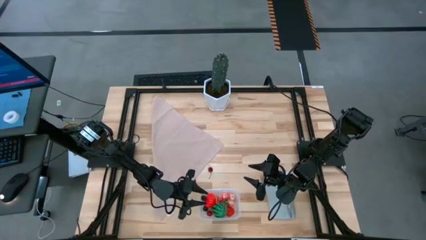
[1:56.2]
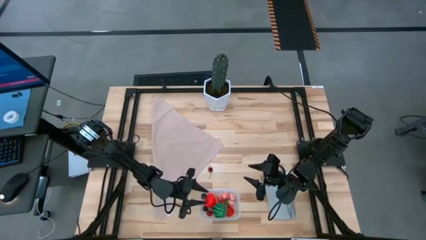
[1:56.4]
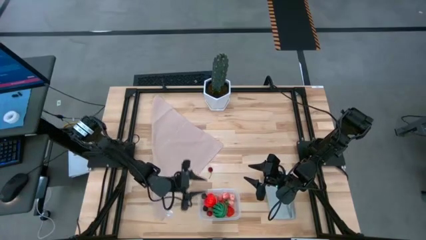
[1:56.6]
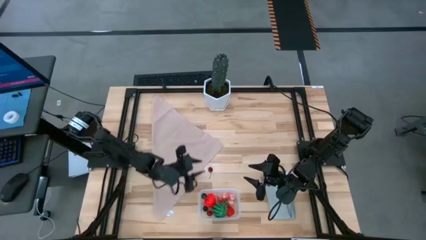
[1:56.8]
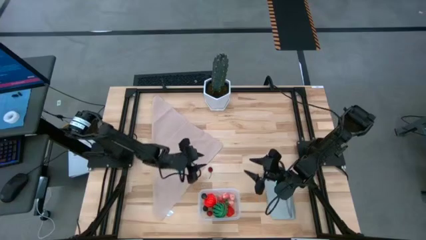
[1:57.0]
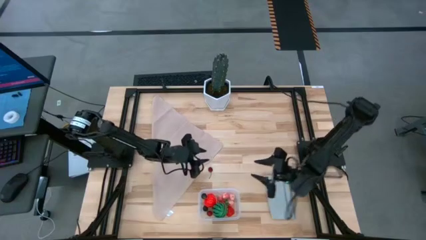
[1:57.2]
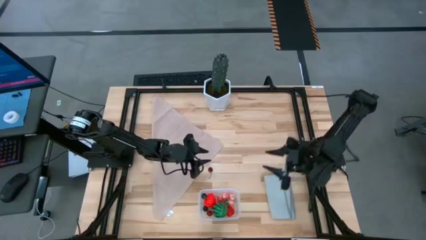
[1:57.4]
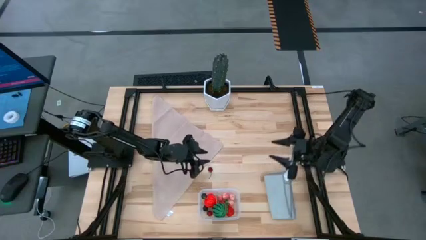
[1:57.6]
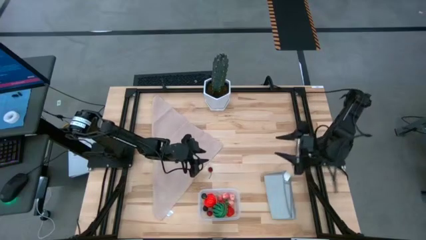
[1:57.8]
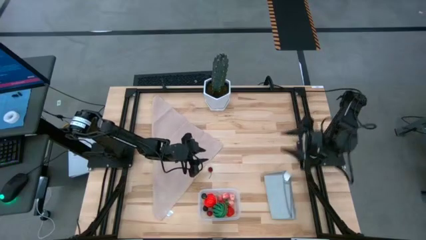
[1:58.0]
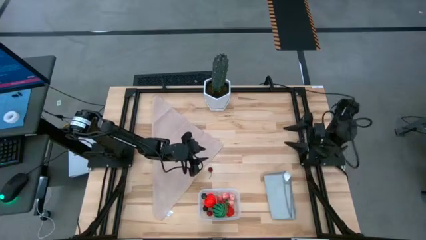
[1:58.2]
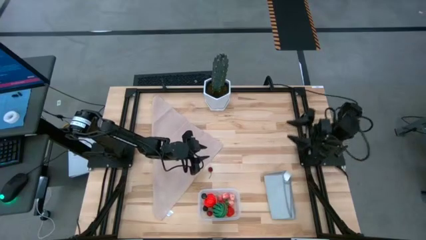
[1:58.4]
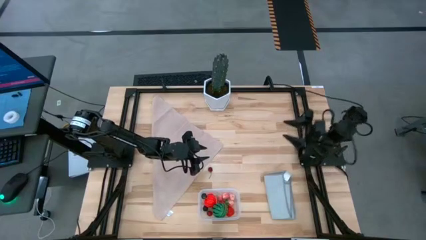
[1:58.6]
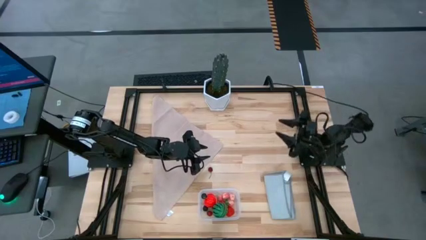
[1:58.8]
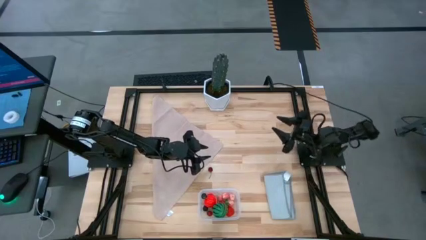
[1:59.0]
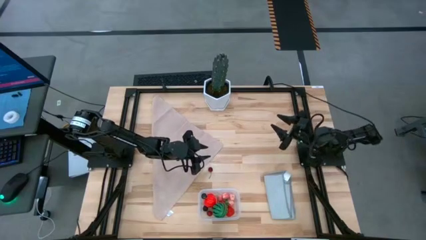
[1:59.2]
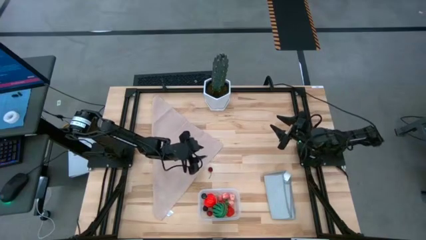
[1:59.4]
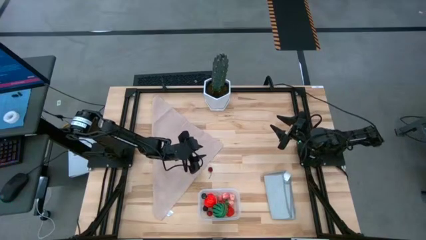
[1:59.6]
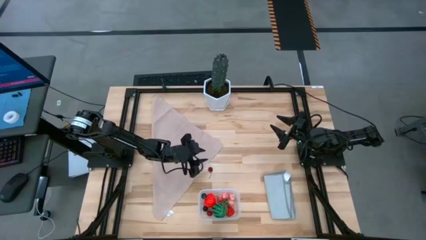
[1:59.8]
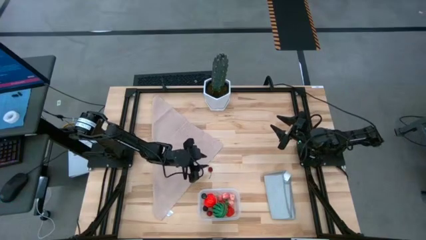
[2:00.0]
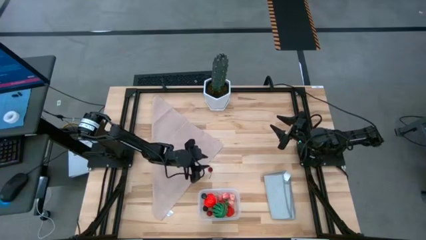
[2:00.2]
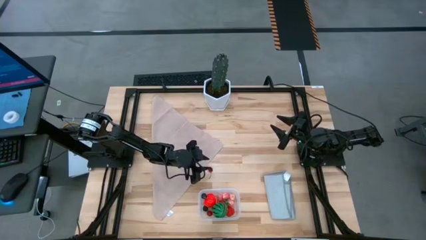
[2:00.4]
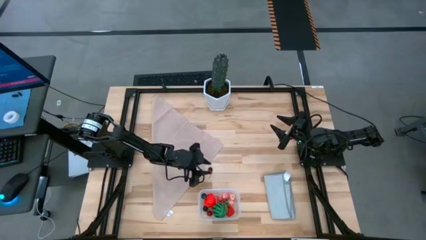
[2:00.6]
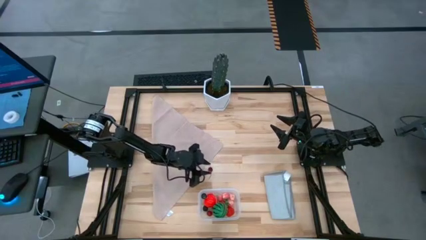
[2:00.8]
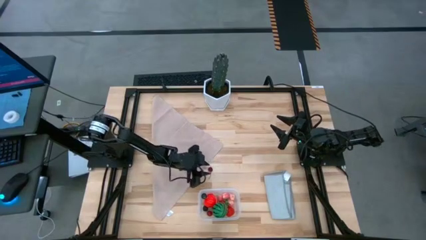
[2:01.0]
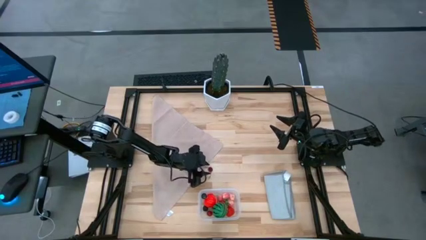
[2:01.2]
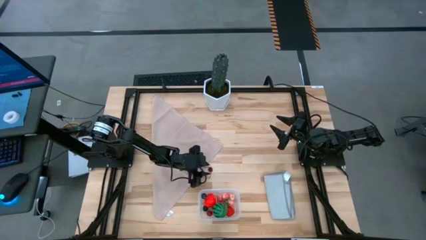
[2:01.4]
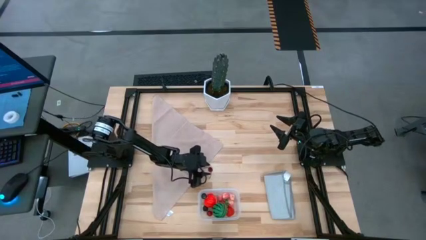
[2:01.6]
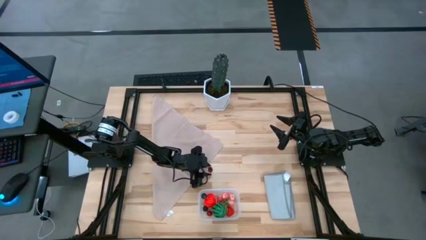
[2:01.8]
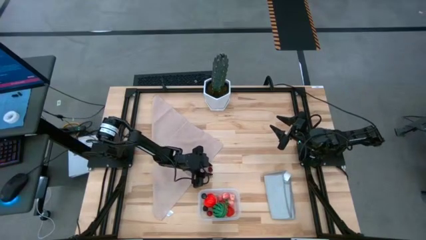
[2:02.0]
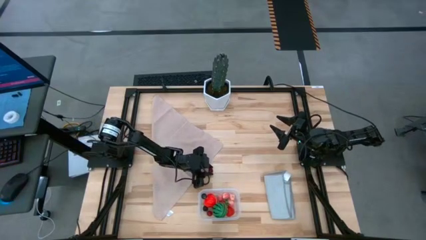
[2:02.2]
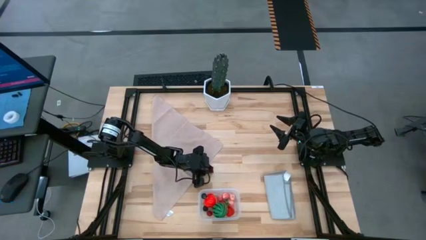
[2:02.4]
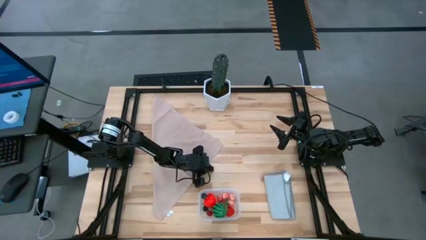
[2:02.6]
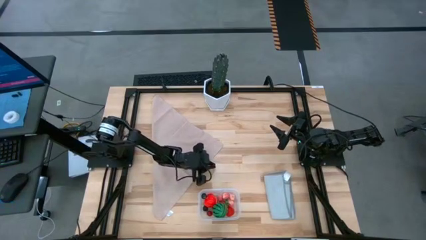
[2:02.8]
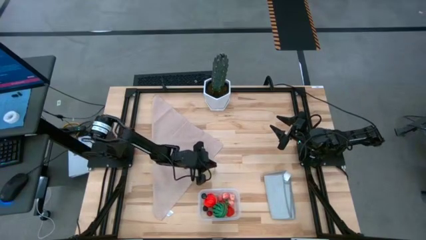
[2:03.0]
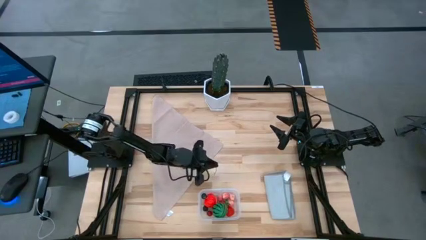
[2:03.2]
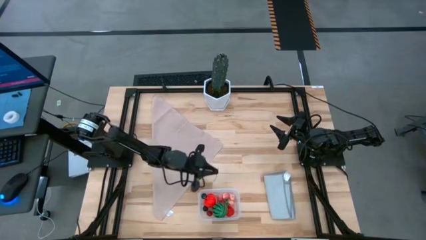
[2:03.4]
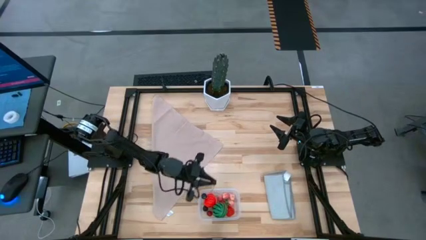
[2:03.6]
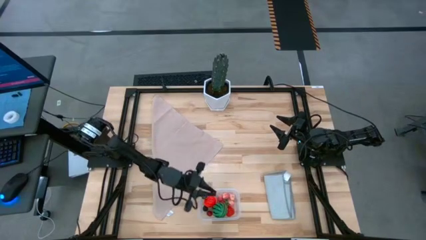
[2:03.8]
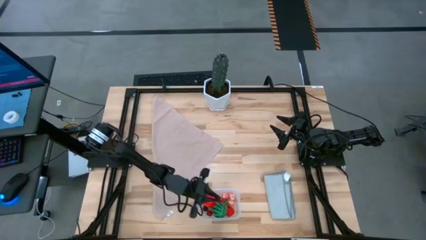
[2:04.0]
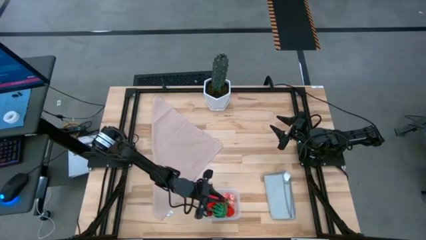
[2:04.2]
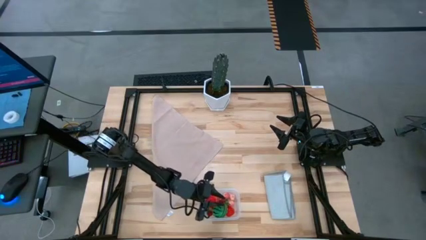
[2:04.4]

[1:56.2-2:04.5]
Task: Pick and placing Produce into tupperware
Put the red cherry into the transparent bin

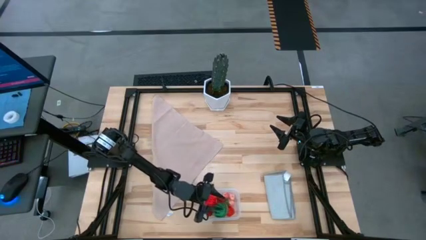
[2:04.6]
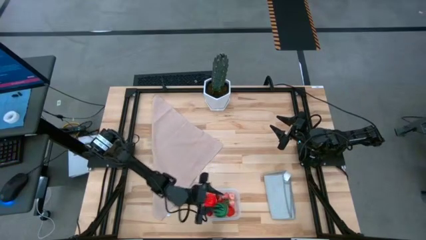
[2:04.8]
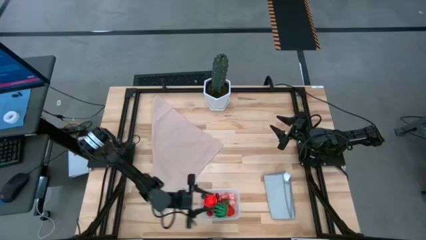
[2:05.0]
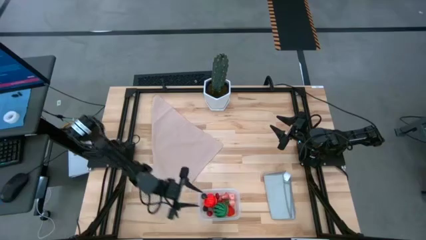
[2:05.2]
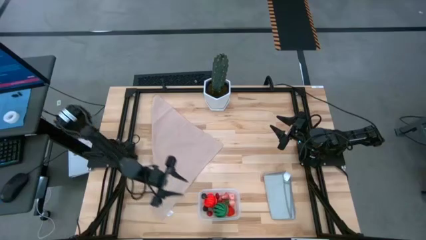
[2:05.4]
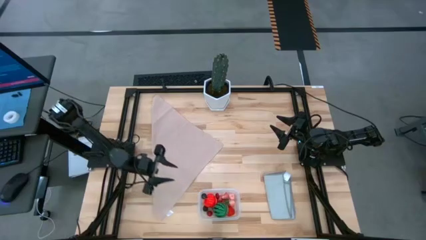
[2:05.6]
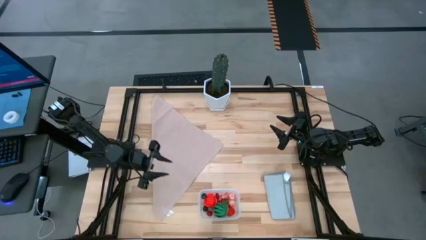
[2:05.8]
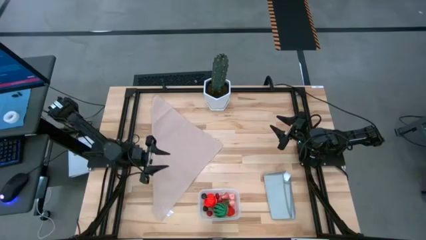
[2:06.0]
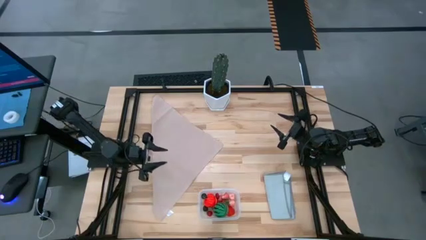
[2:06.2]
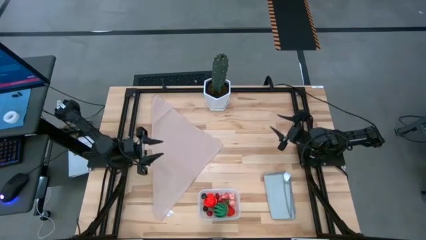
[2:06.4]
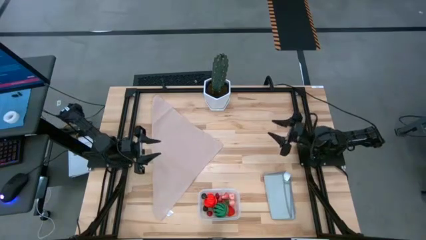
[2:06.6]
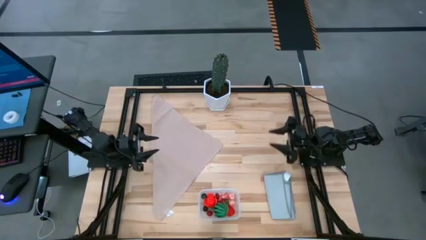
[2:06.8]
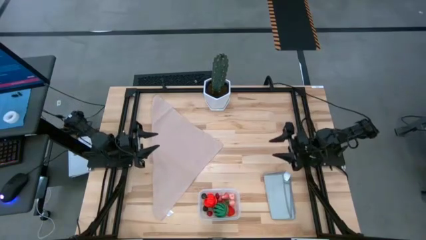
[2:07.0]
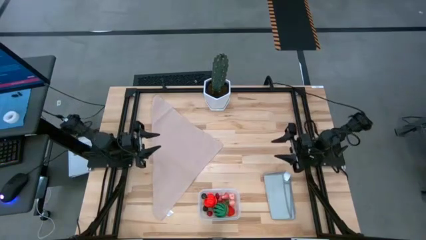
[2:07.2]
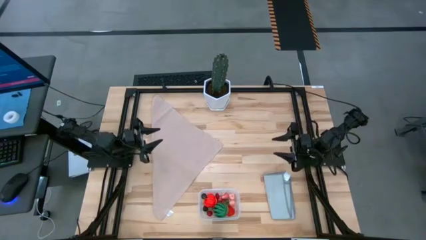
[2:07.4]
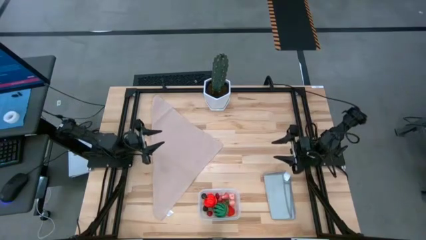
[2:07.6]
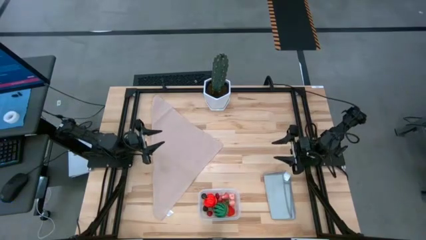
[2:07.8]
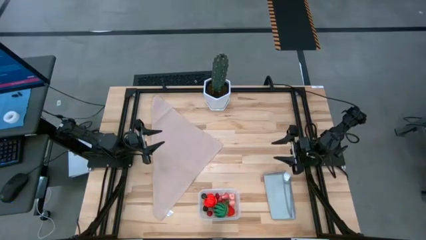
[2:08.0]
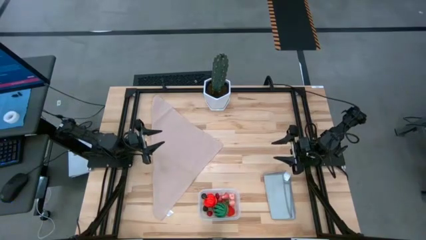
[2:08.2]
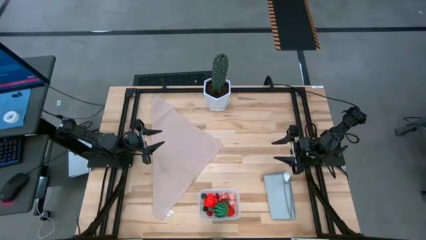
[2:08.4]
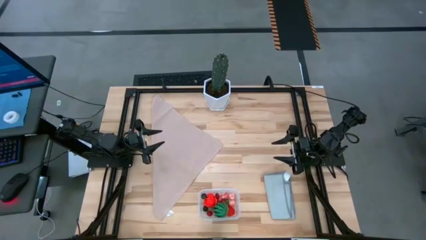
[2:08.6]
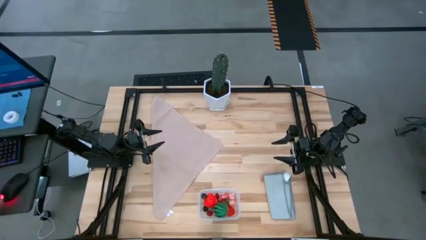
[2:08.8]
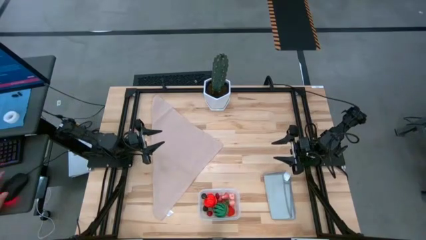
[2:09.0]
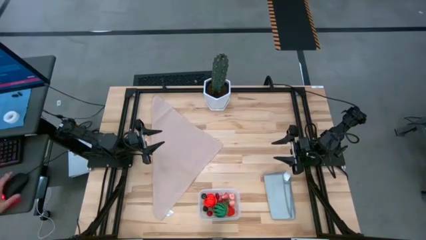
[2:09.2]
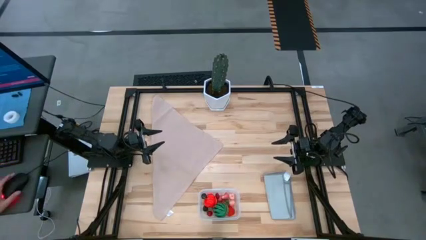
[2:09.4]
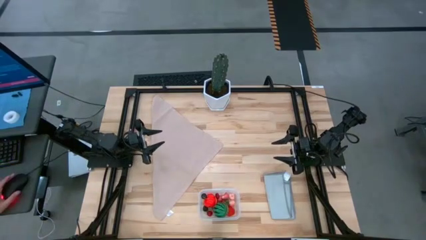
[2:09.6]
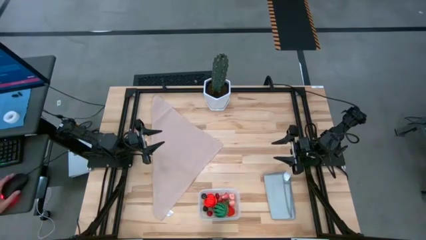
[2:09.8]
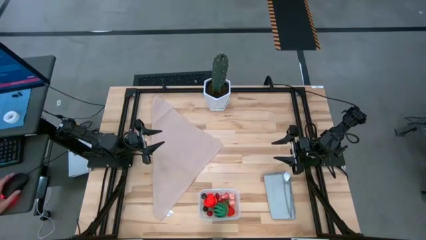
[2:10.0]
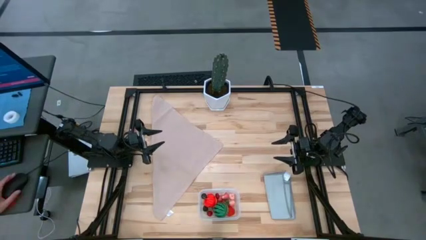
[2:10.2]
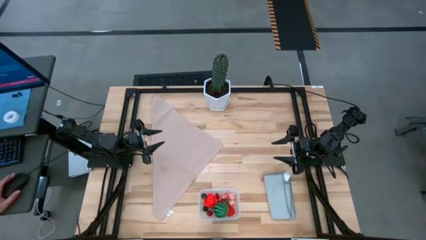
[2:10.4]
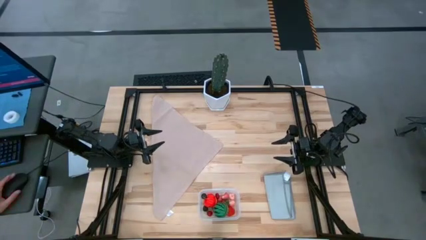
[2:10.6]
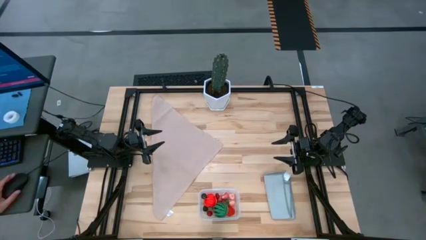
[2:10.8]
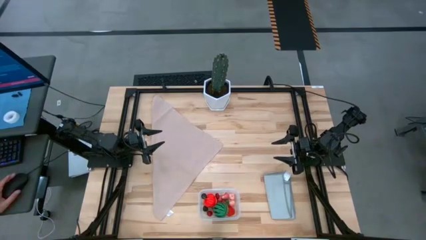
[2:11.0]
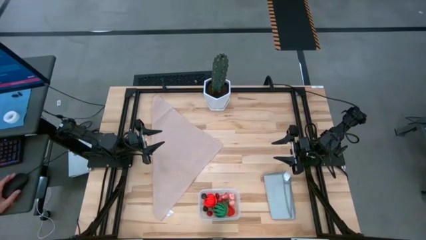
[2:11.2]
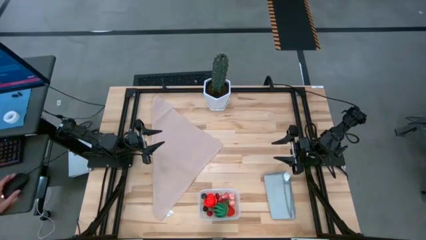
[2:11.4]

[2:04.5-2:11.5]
Return to Home Position

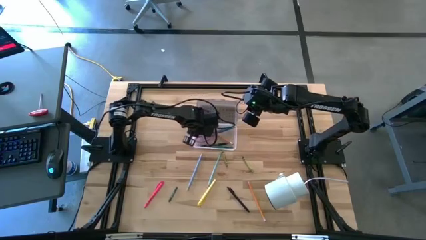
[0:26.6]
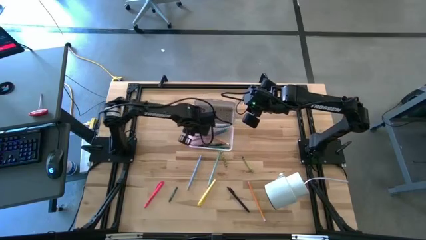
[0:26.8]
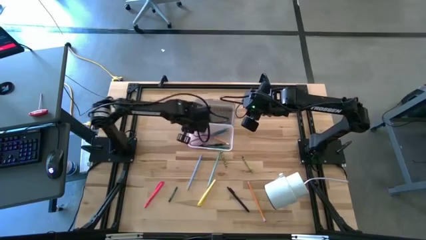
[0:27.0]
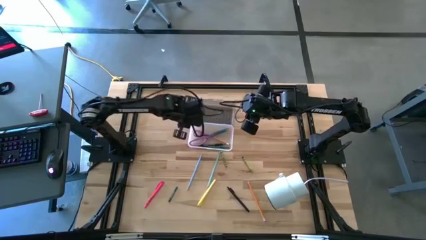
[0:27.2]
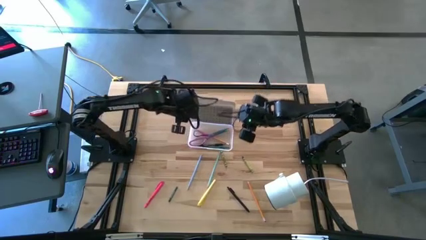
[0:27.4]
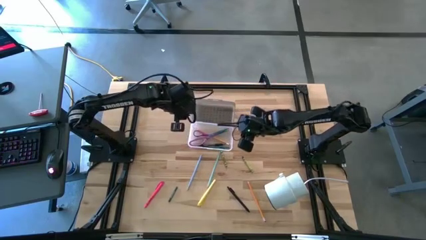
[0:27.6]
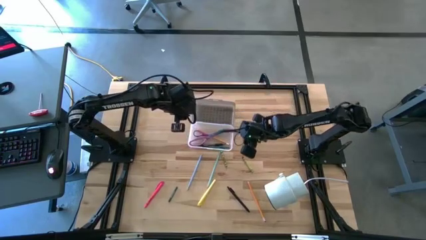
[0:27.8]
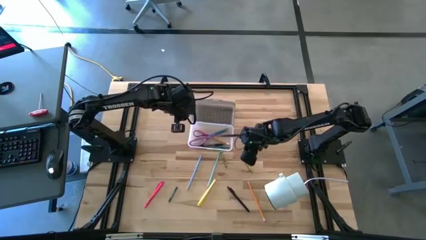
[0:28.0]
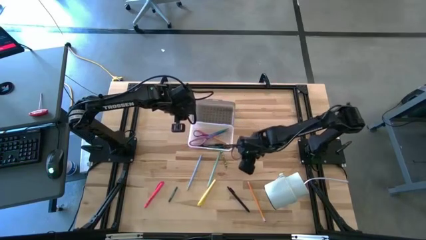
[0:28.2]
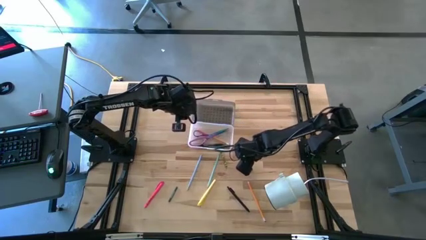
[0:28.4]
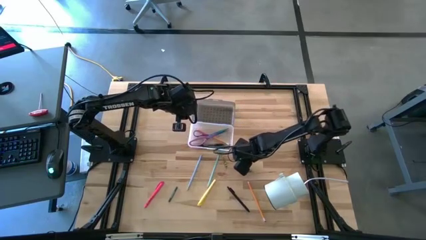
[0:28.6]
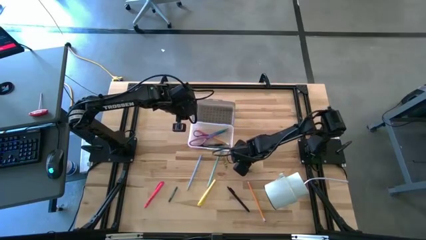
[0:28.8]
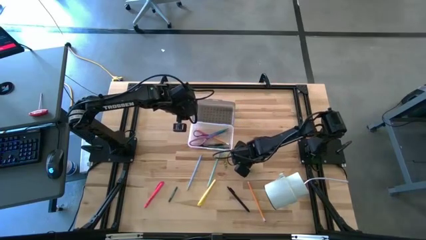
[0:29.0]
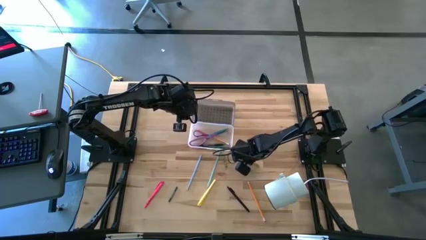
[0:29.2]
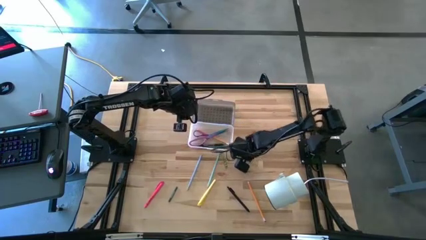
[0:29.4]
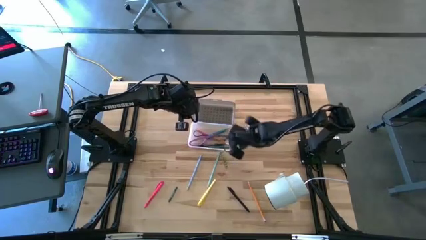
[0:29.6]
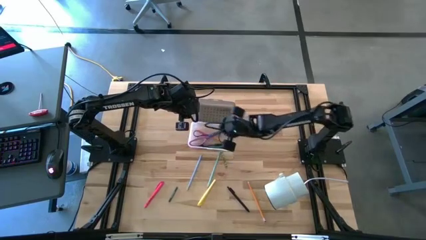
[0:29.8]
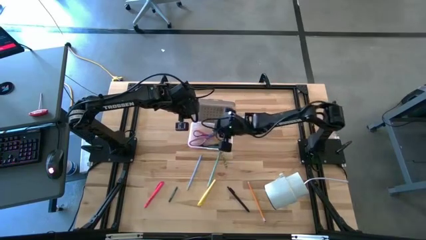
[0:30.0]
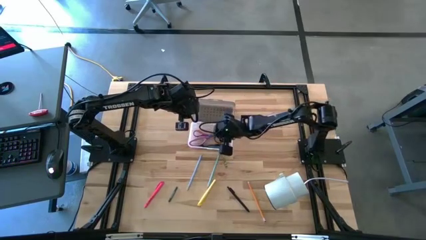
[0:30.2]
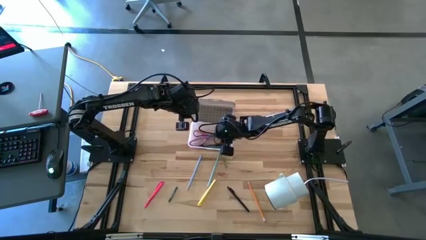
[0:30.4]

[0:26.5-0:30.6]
Task: Pick & place school supplies into a supply box
Put the right green crayon into the black supply box
